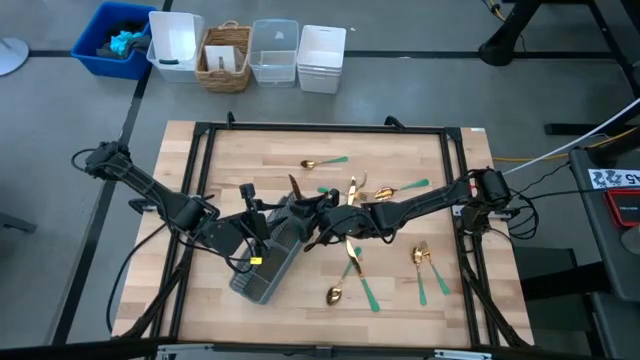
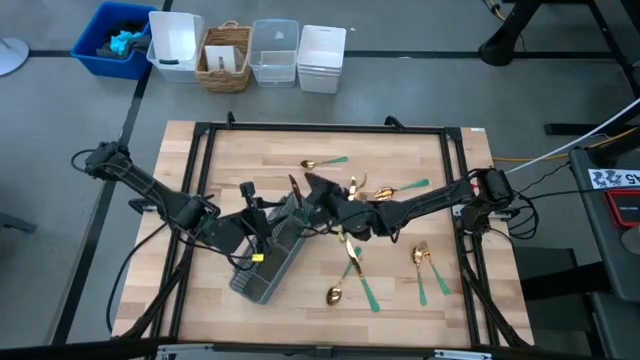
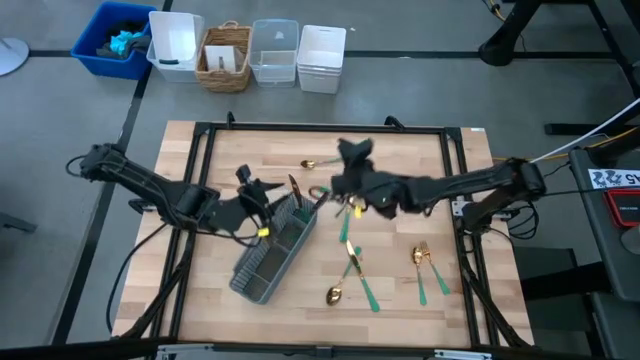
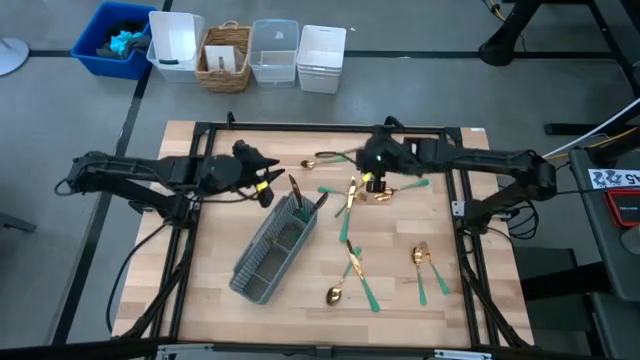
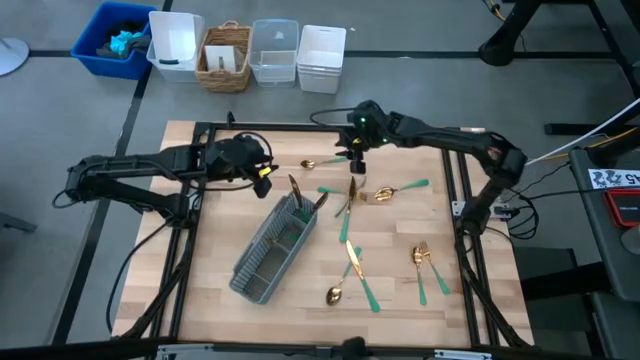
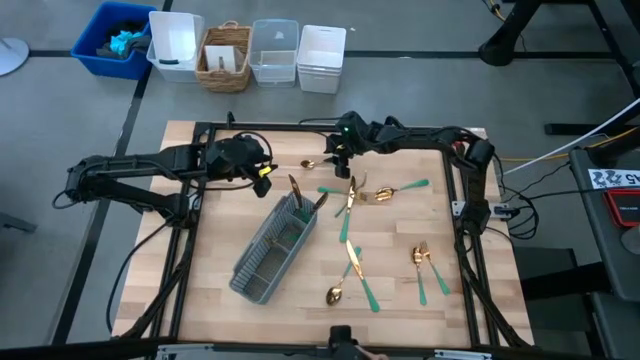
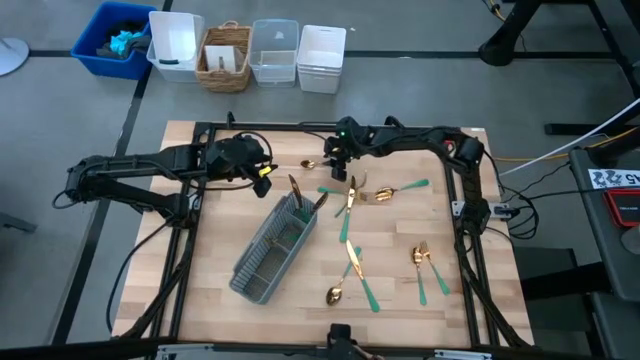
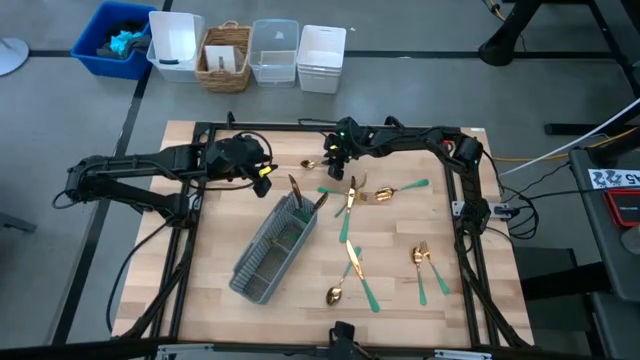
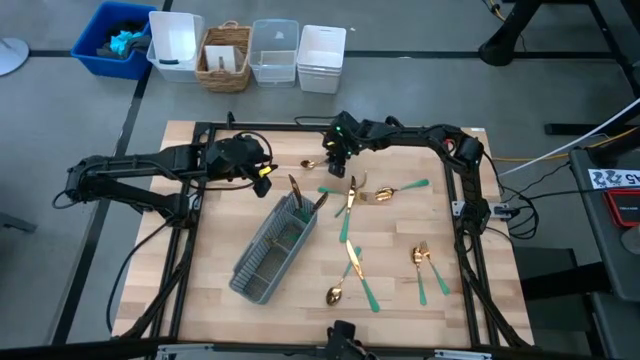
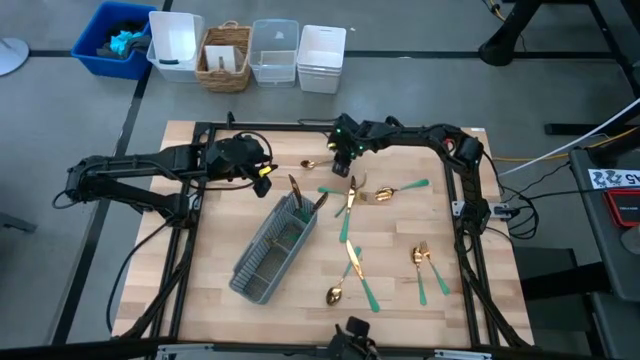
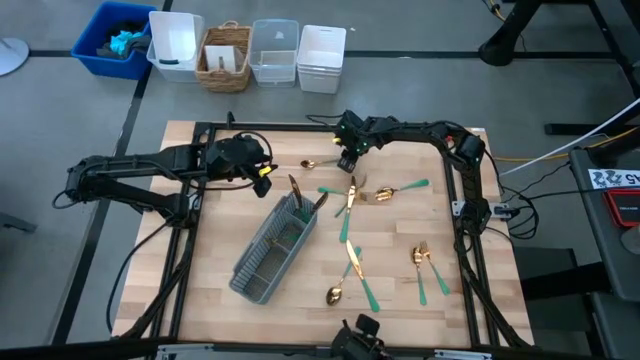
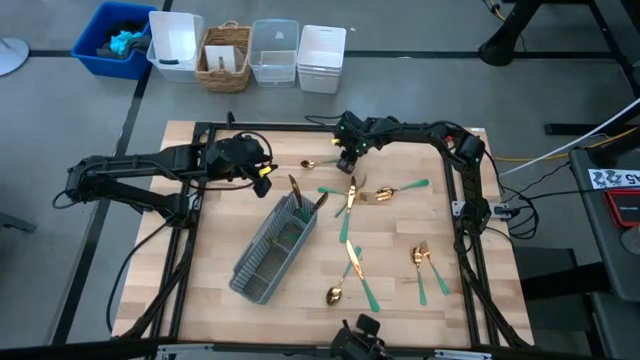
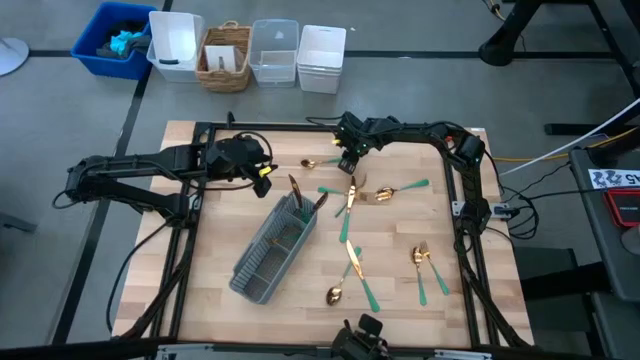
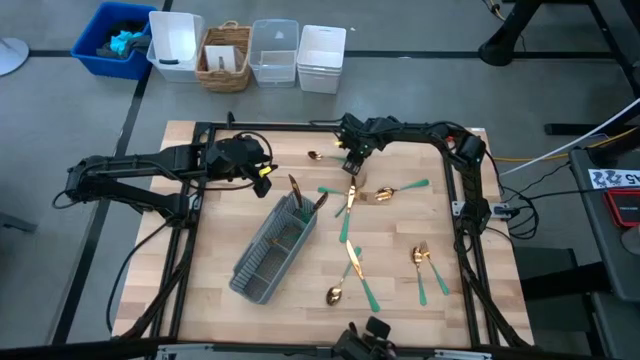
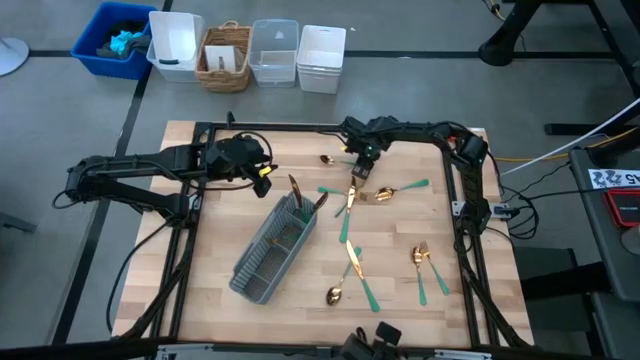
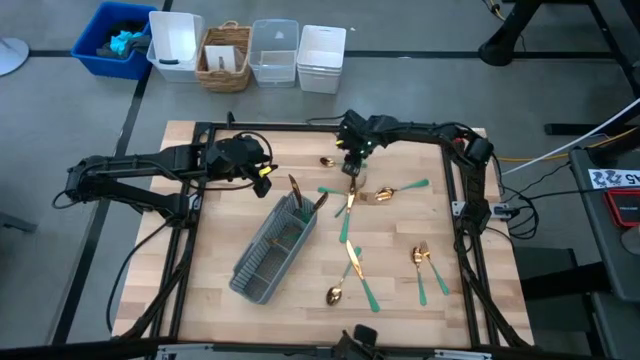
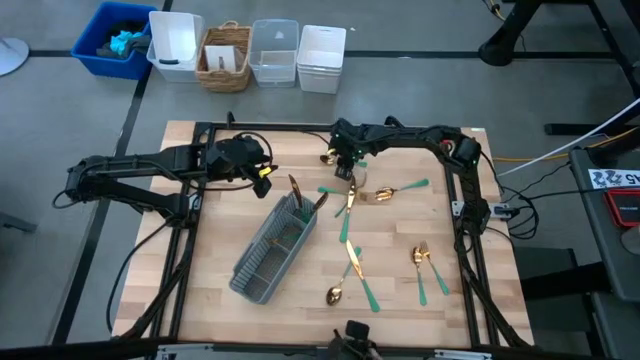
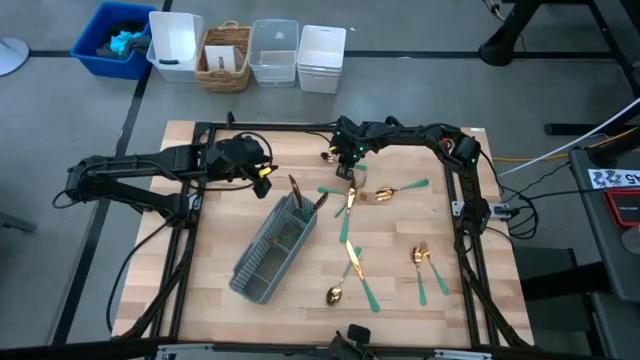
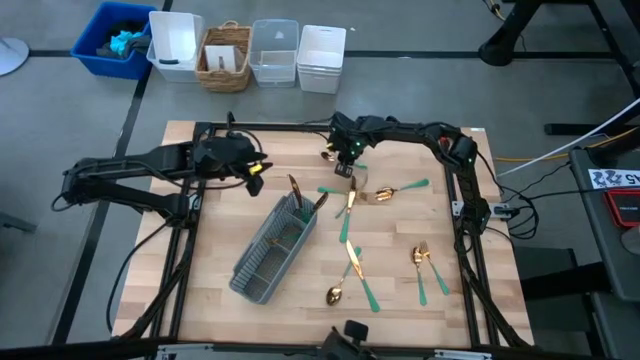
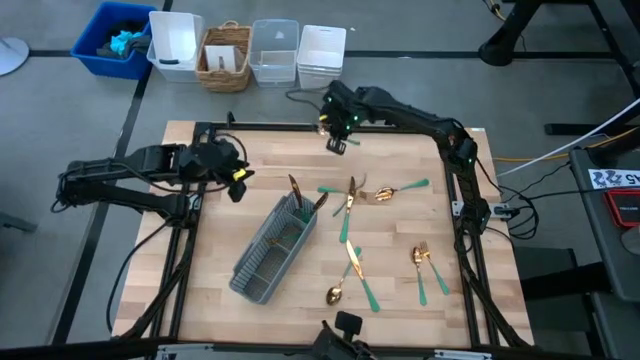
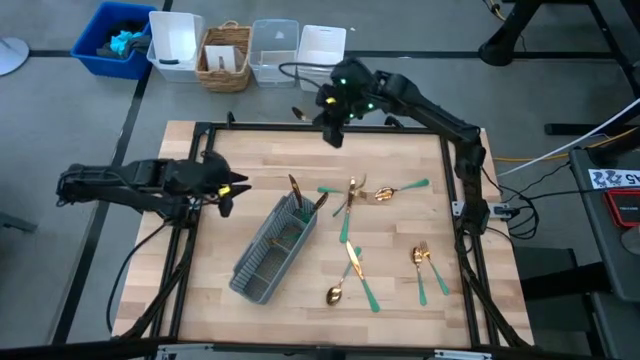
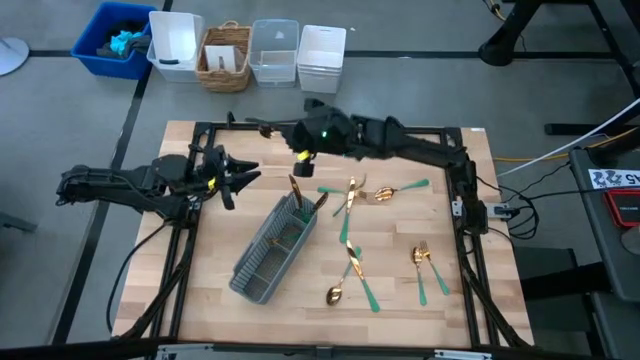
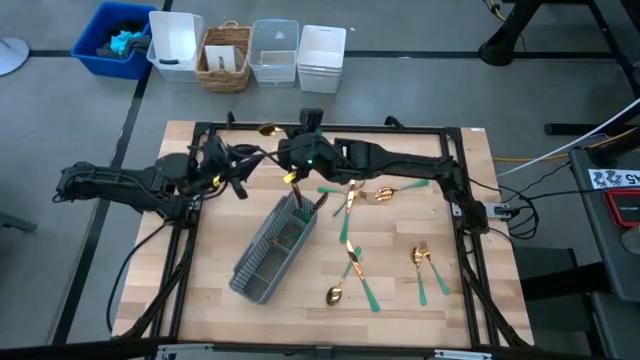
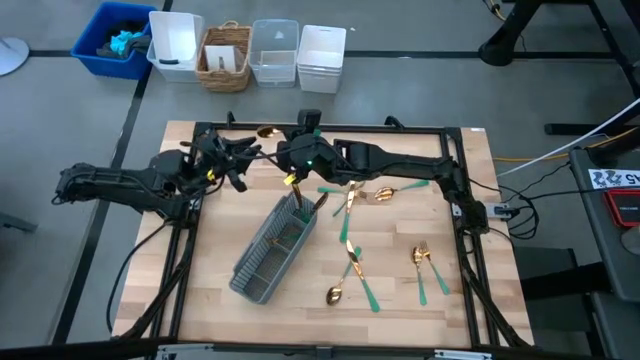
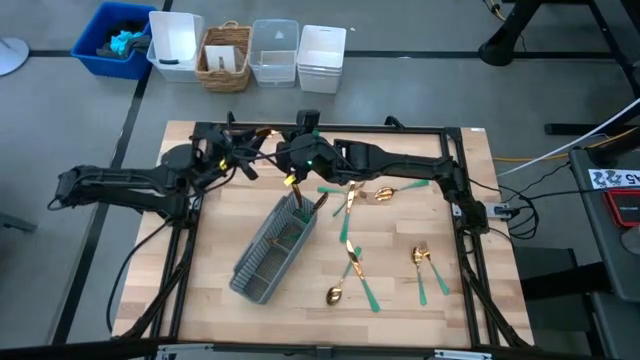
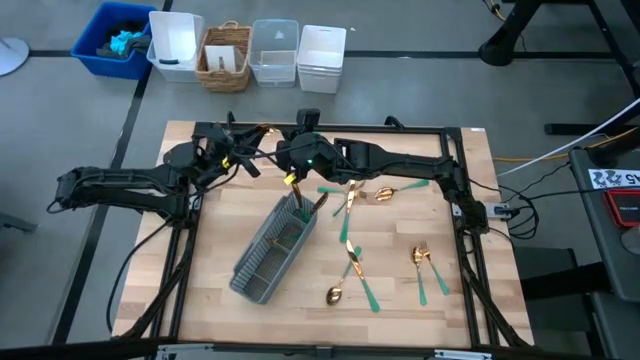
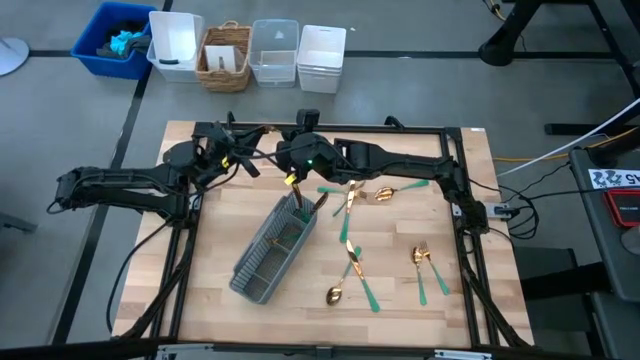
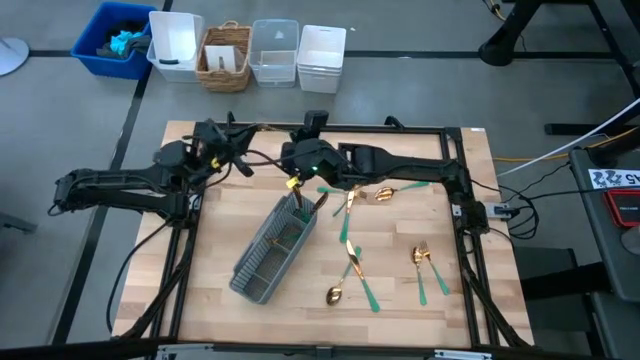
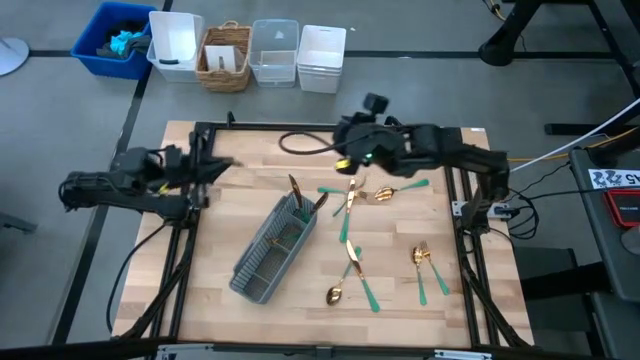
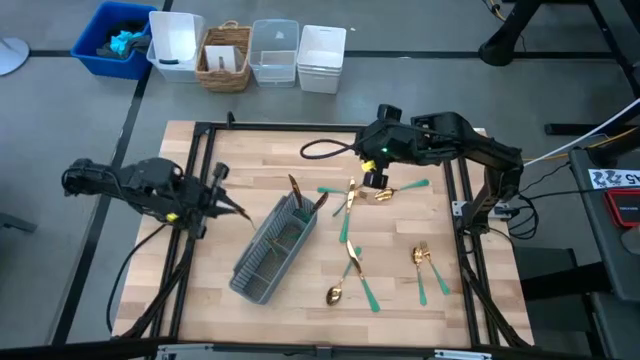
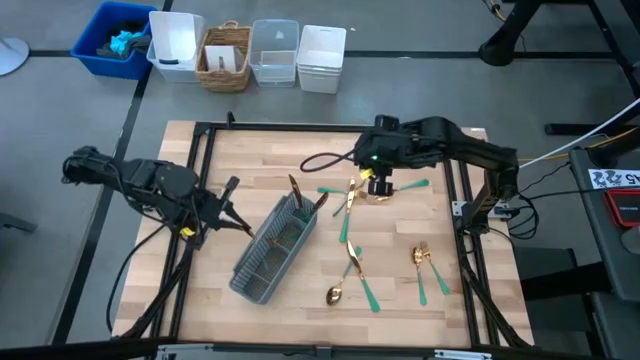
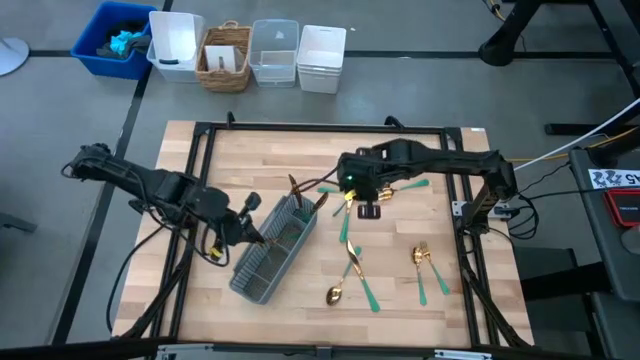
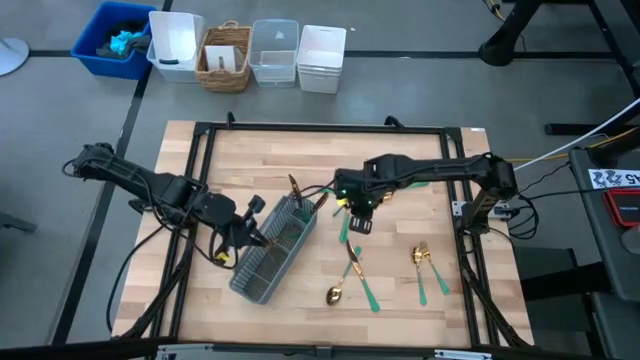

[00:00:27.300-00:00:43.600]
Task: Sort silverware
Put the green spoon into the silverware basket

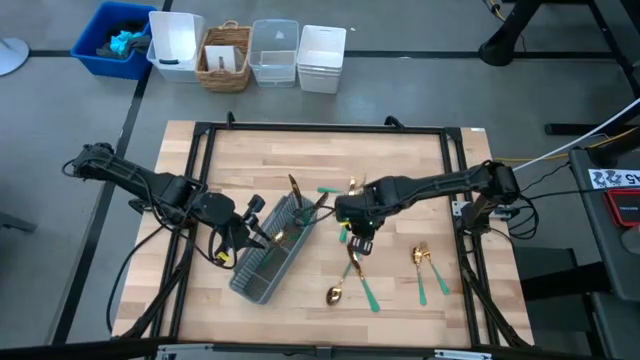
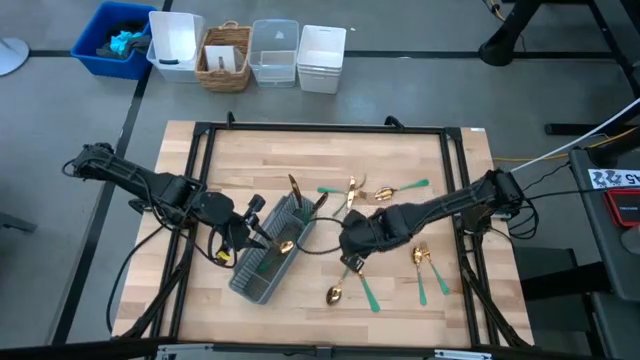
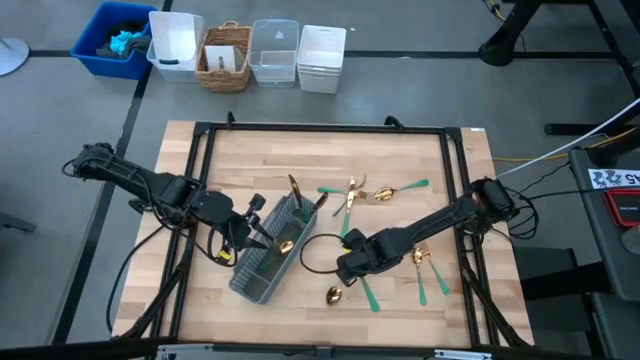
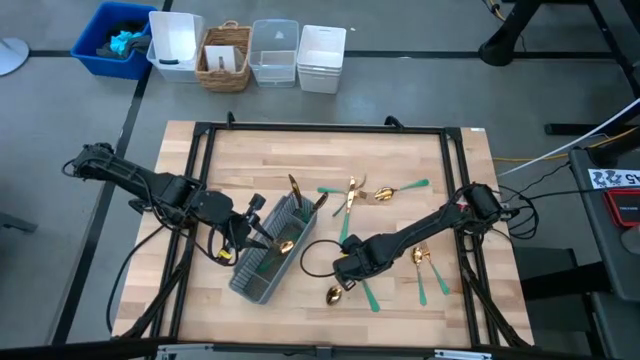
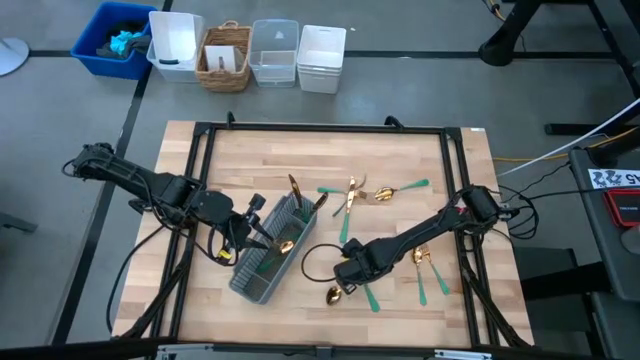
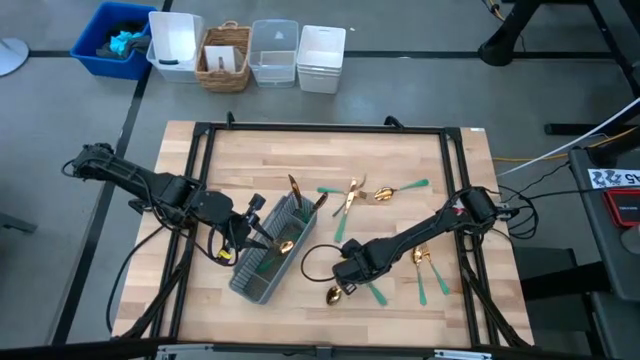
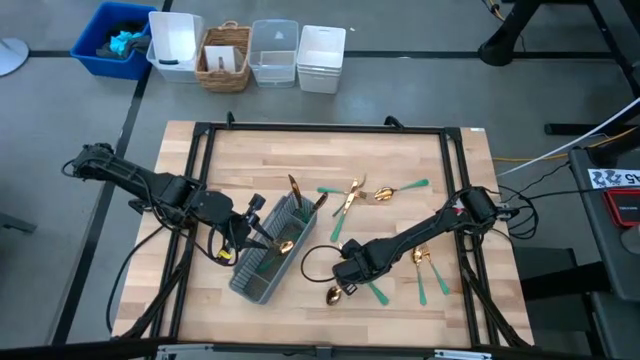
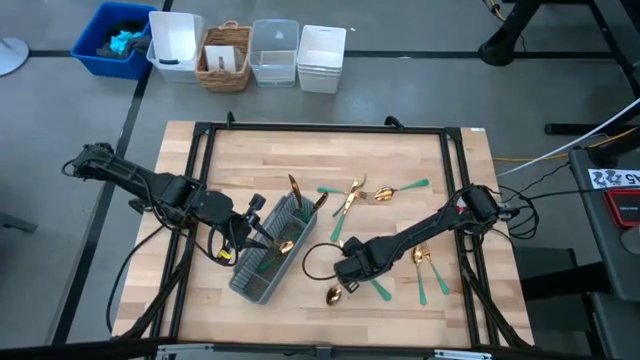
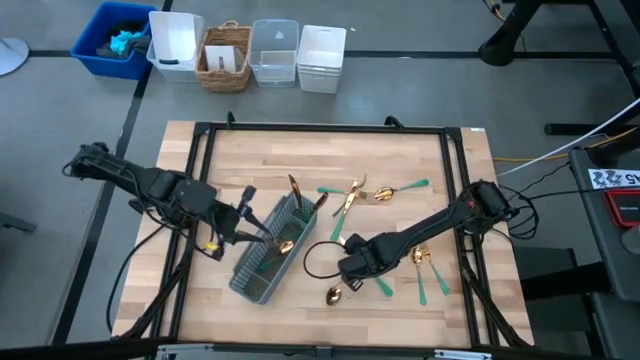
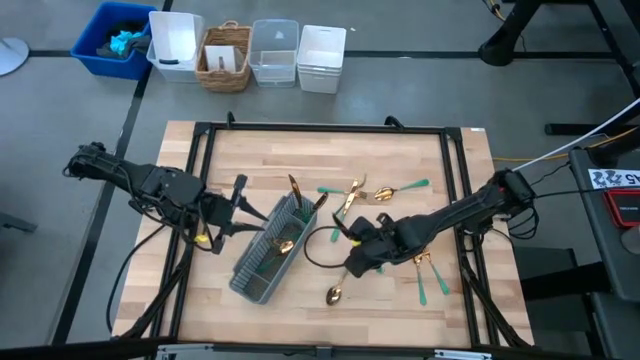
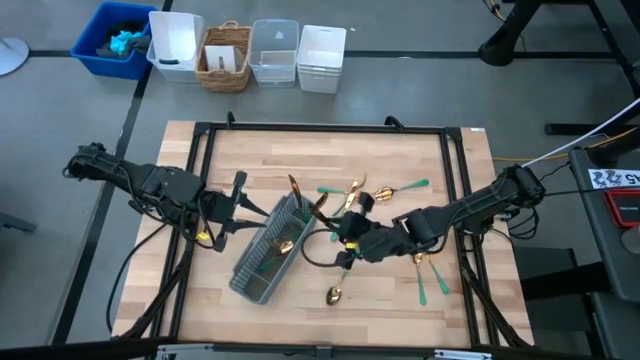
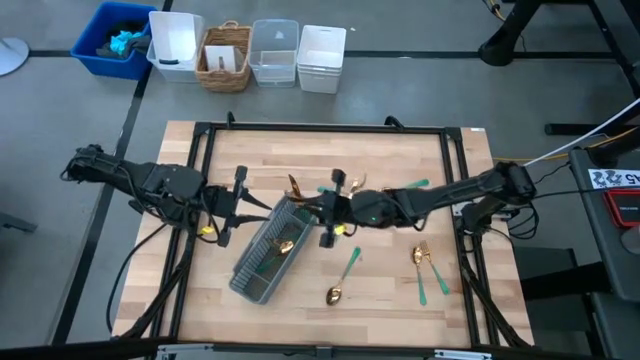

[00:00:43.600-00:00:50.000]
Put the green knife into the silverware basket
